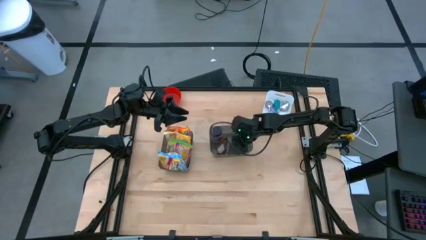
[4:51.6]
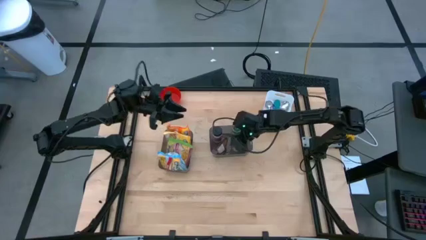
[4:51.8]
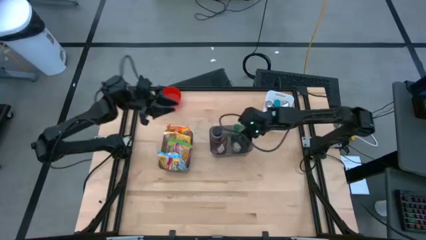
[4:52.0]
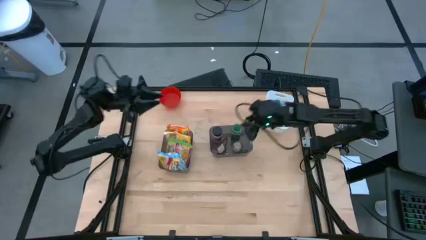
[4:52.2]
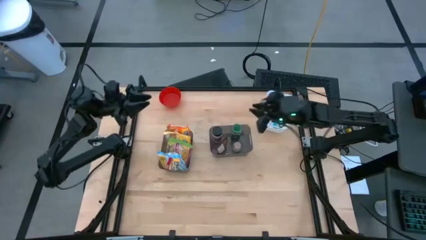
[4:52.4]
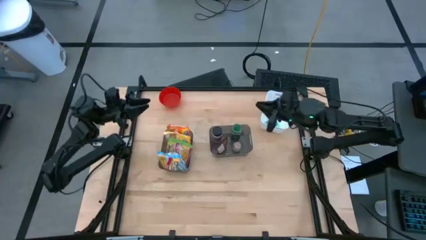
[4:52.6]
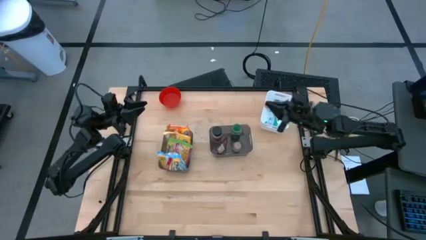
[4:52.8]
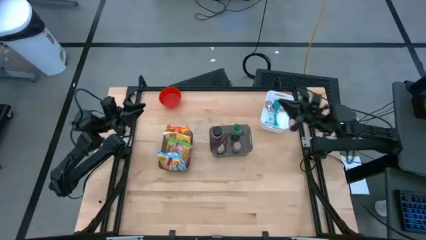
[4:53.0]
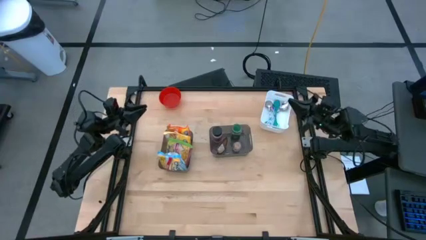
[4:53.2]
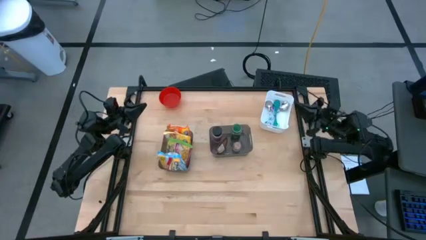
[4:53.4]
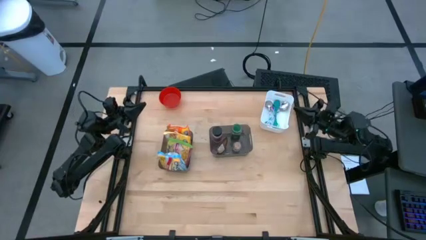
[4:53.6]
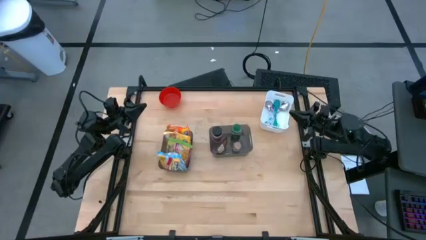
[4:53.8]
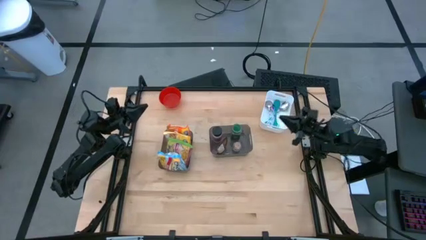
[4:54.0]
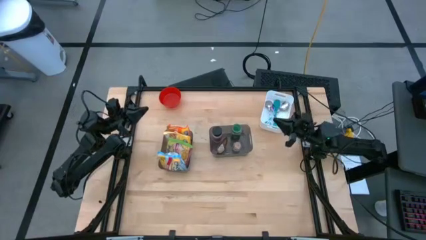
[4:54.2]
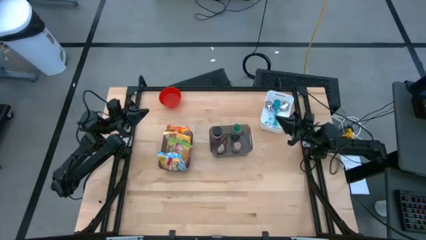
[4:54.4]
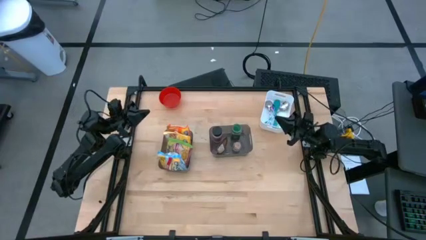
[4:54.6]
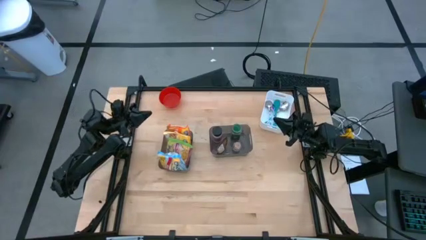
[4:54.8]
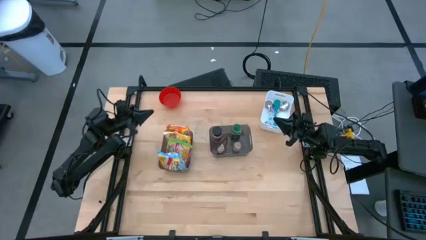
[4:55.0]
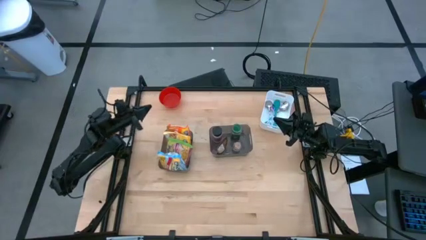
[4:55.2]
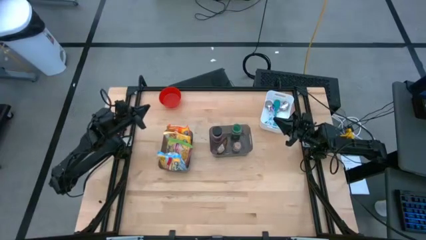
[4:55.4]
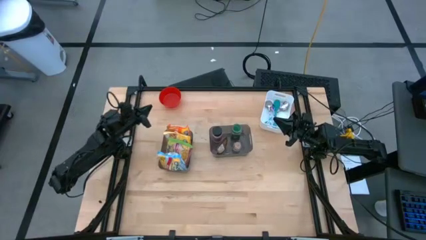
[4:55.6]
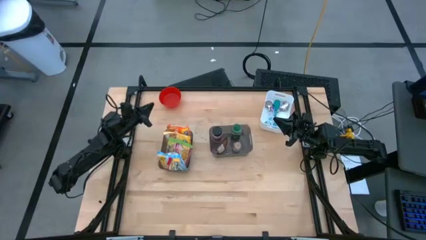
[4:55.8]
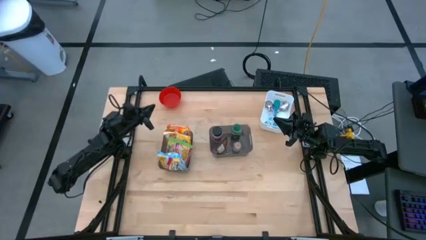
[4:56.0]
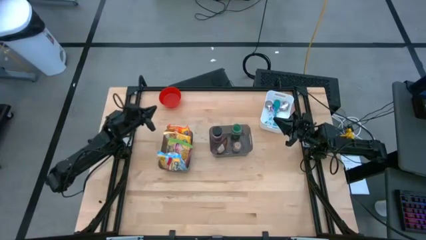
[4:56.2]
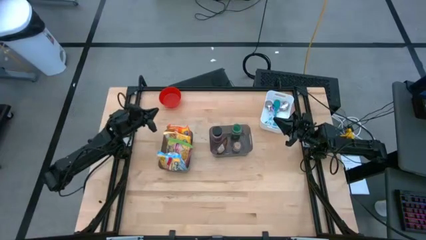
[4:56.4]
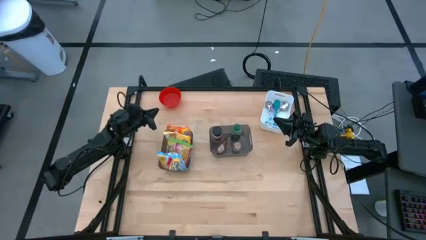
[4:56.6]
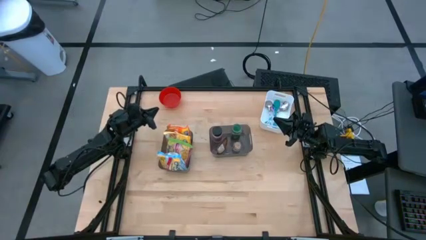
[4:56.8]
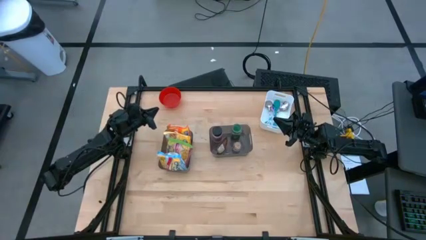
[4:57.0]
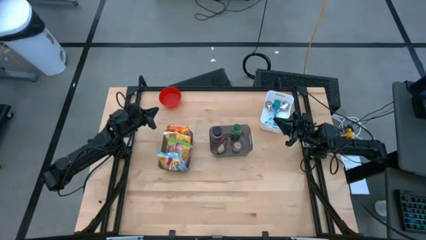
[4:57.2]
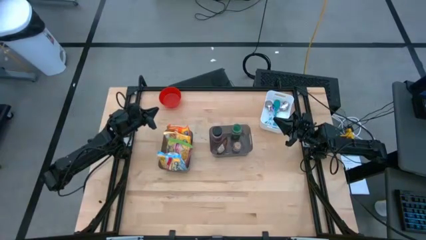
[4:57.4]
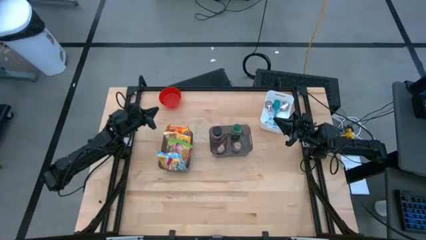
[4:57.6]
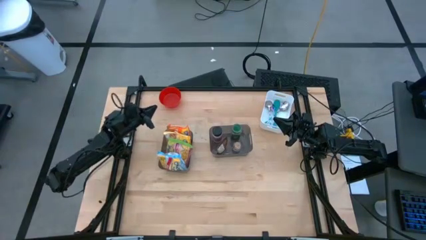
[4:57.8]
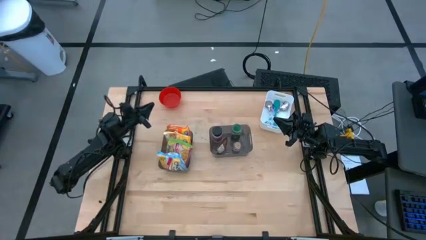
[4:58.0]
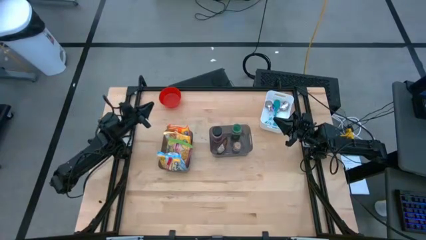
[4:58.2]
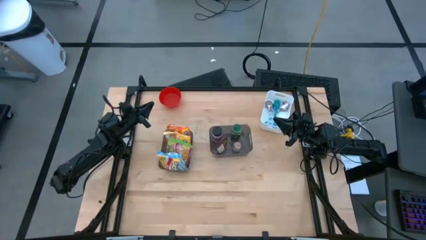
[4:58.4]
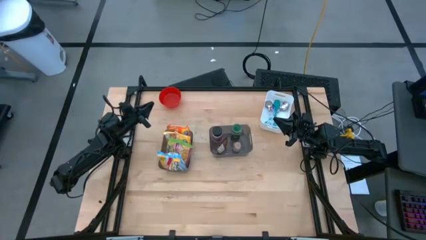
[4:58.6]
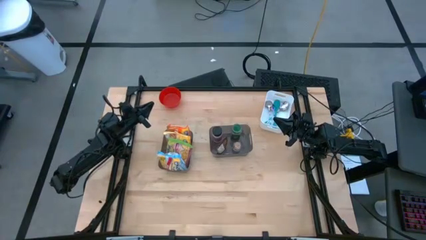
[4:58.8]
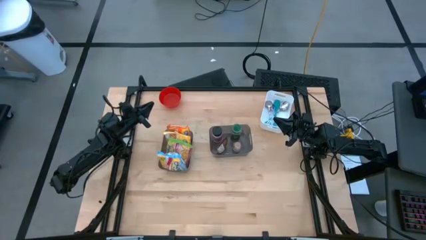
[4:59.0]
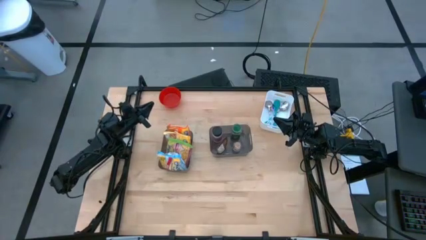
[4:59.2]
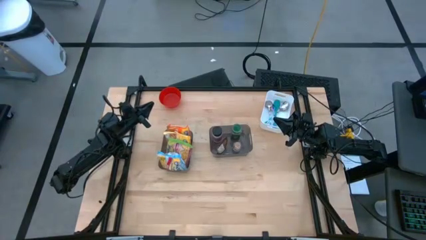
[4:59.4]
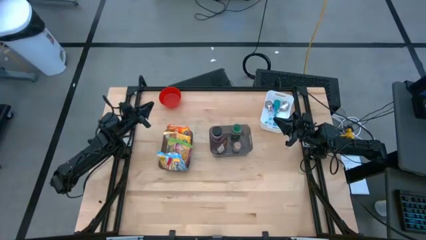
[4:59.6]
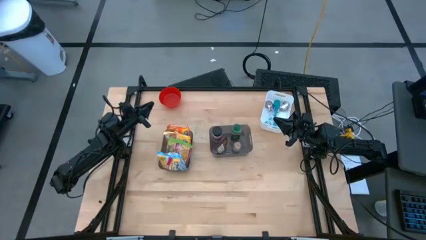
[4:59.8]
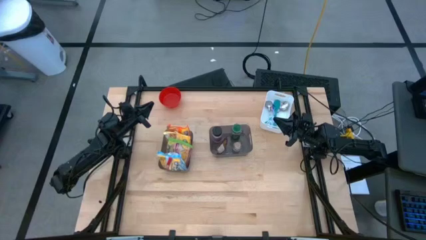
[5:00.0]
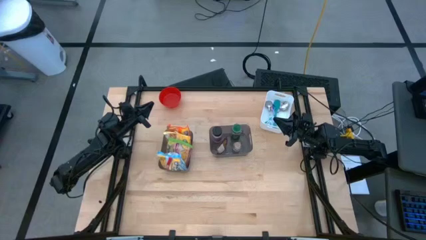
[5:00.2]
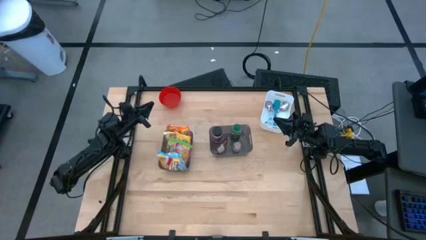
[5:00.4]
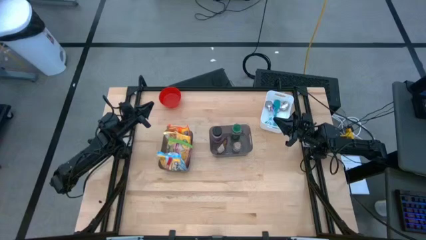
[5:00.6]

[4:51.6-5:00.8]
Task: Pick & Place Food Item
Return to Home Position

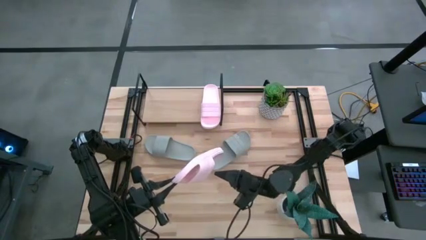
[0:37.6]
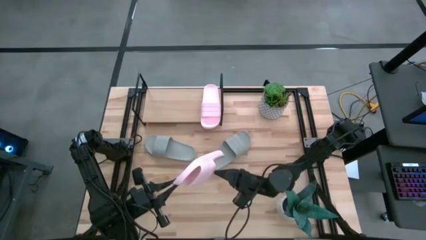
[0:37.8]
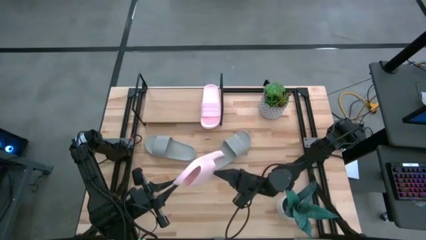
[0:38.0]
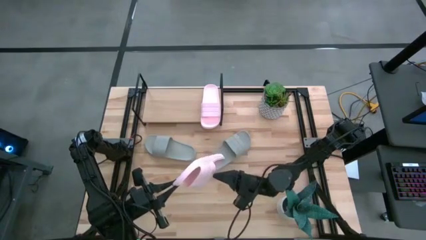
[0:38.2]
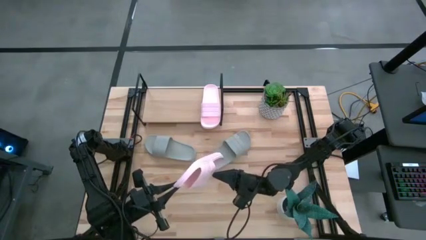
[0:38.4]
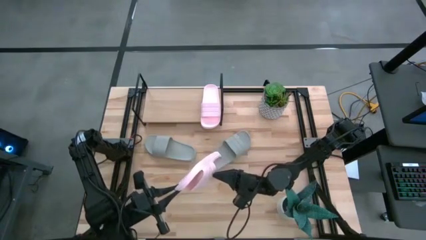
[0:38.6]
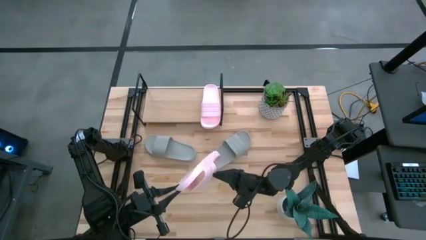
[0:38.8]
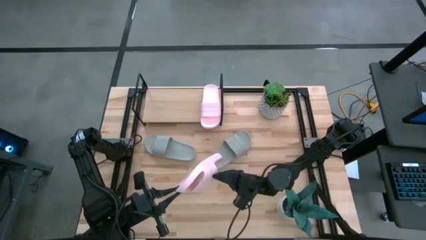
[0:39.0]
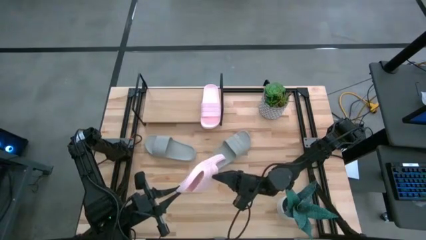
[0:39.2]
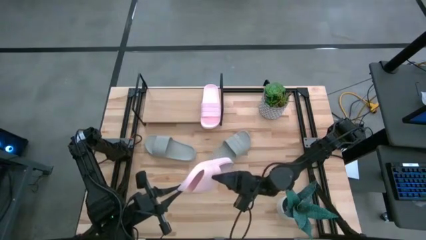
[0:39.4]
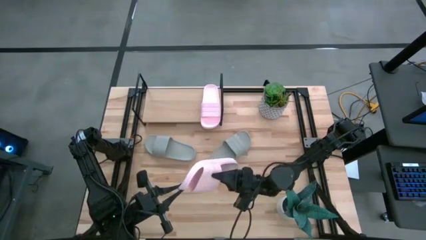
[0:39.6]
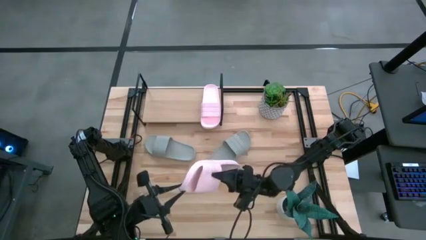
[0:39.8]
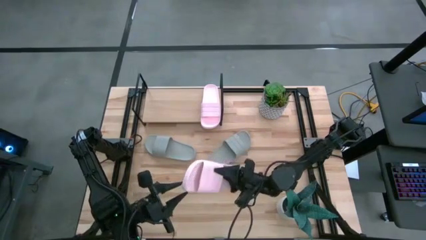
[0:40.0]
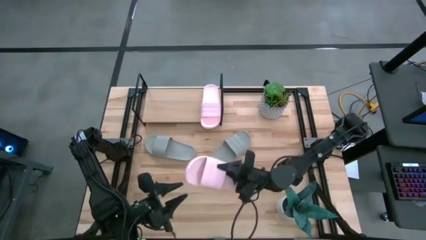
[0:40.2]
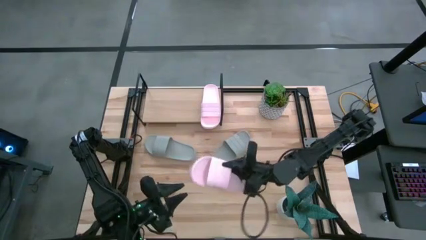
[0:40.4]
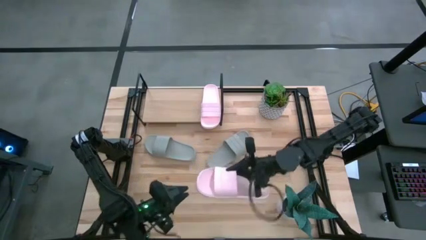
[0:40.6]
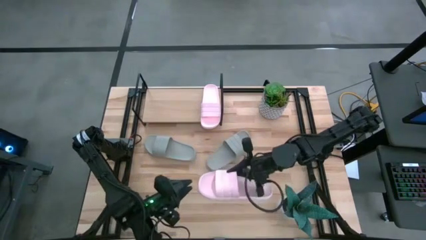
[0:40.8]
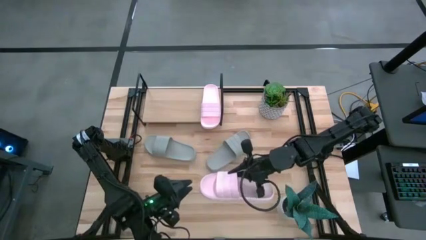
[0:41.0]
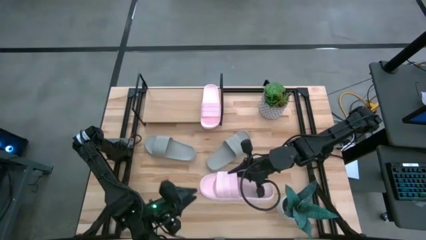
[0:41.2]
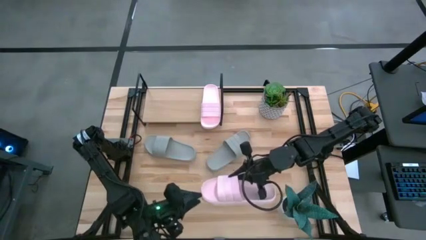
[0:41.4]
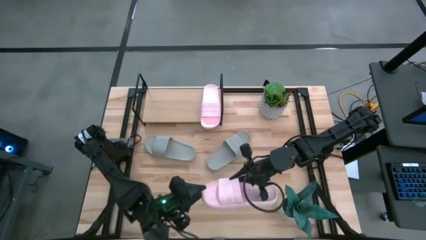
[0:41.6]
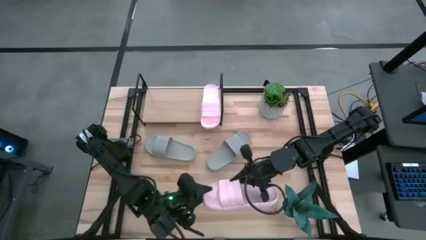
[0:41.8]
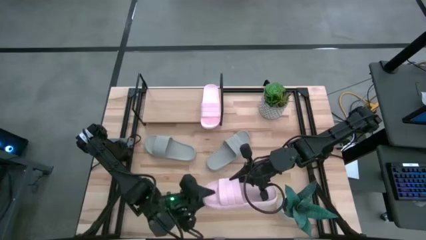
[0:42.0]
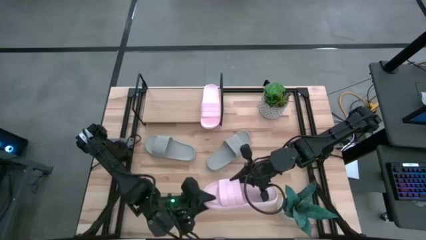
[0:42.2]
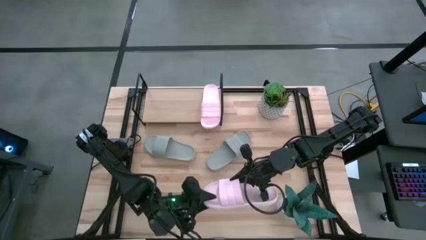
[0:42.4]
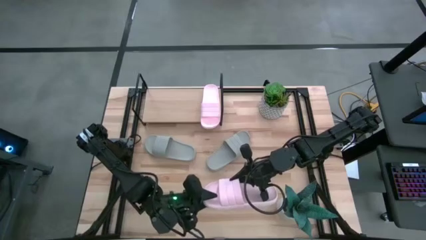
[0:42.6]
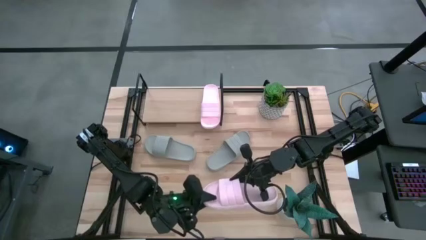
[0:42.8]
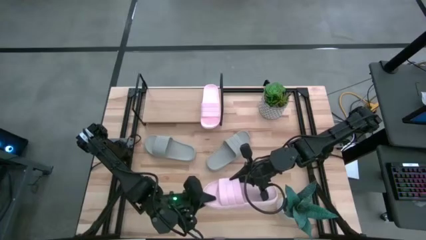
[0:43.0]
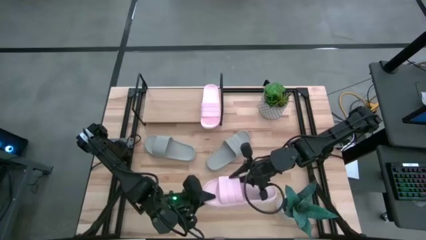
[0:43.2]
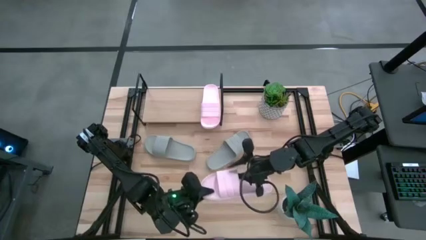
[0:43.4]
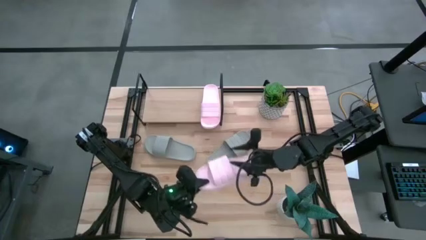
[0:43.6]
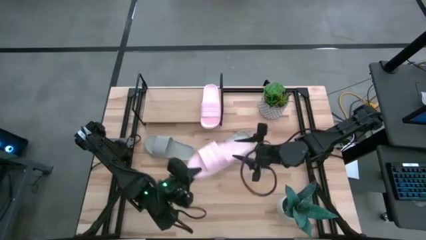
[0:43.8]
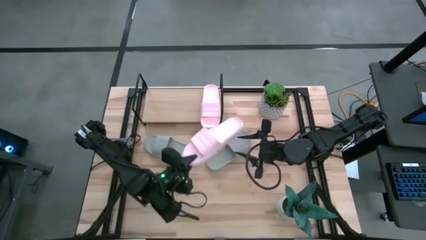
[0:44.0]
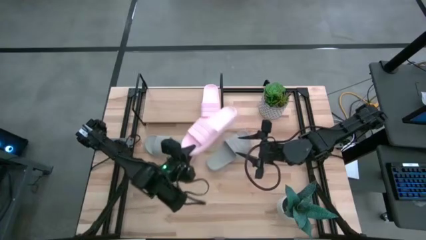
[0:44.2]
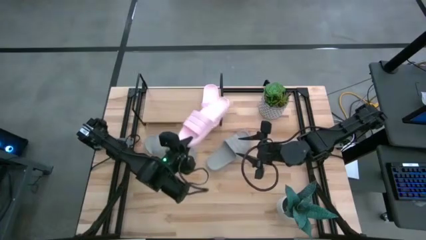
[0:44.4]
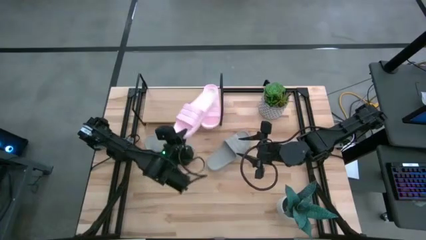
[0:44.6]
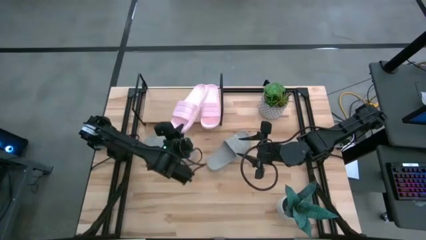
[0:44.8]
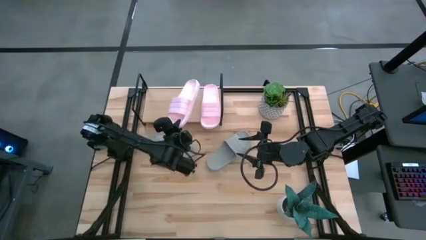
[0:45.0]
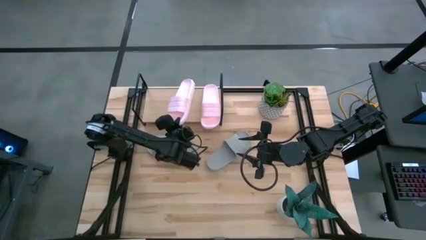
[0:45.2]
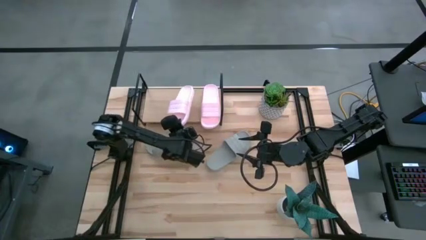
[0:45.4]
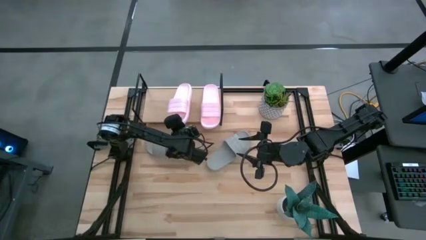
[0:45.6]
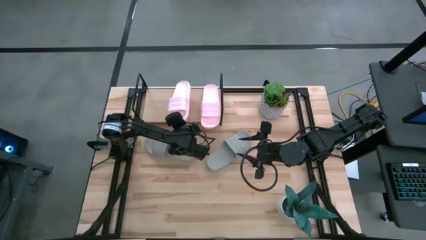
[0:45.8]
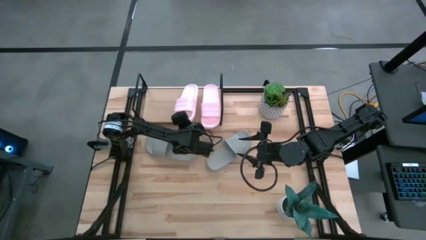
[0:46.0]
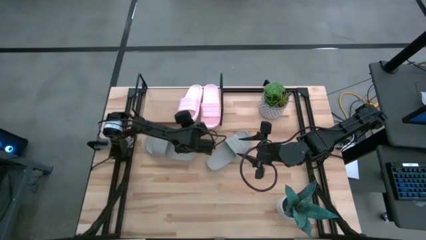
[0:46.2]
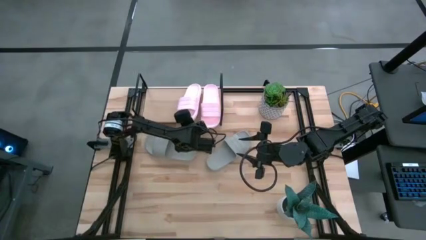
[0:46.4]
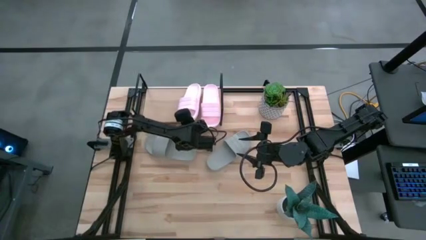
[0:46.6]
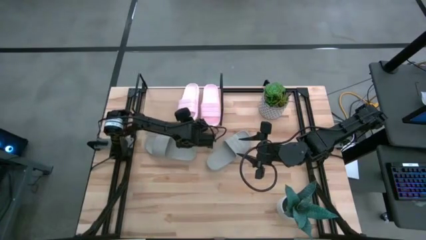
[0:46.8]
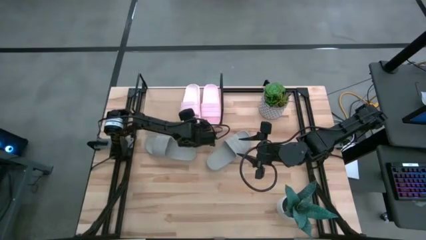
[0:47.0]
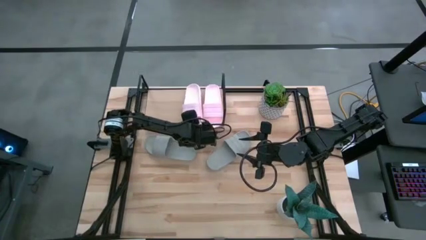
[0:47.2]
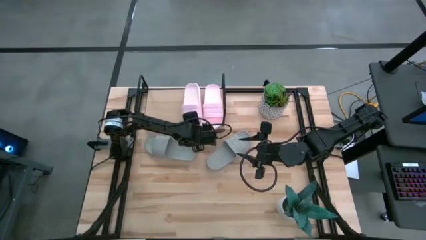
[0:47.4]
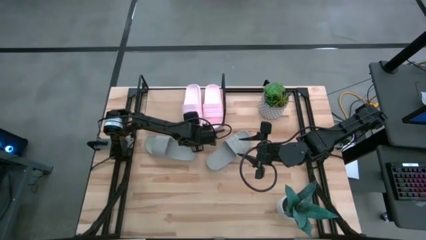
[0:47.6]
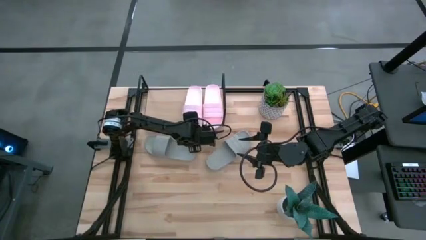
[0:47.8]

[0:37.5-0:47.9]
Task: Pick and place slides into the shelf
Put the pink slipper on the shelf
